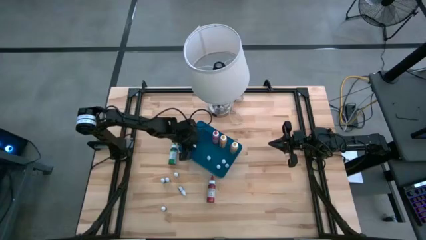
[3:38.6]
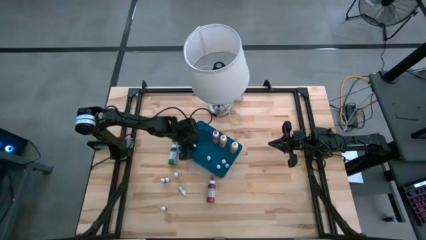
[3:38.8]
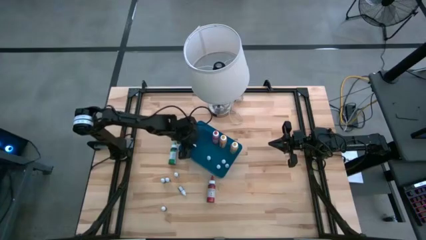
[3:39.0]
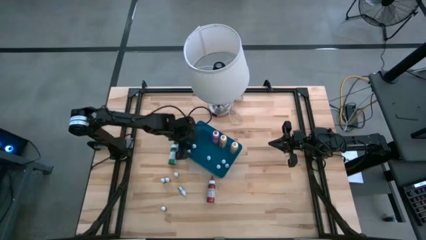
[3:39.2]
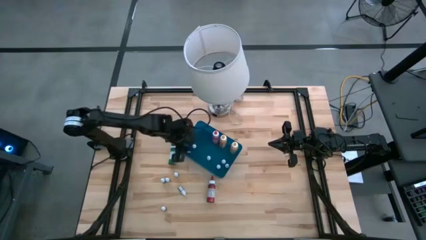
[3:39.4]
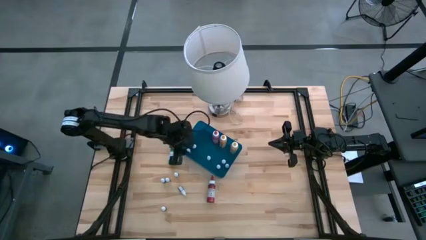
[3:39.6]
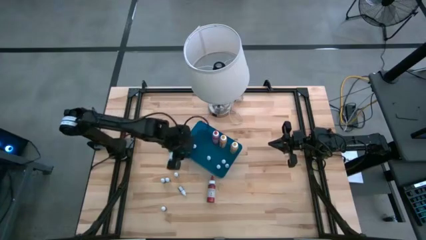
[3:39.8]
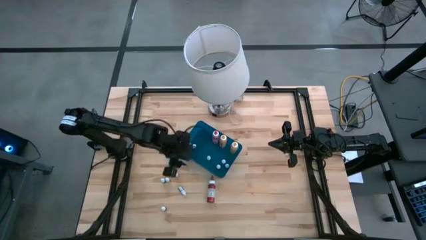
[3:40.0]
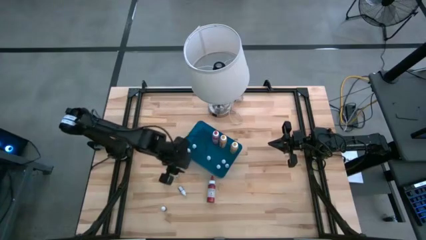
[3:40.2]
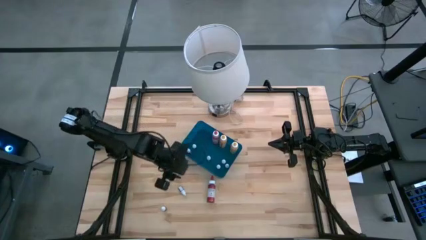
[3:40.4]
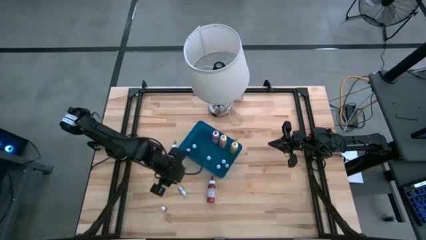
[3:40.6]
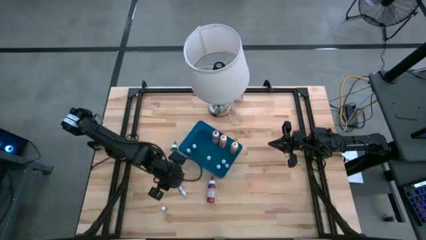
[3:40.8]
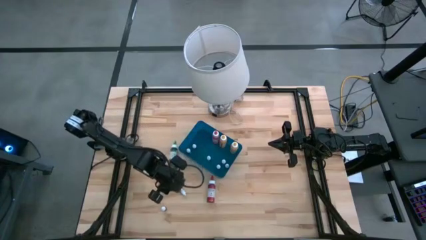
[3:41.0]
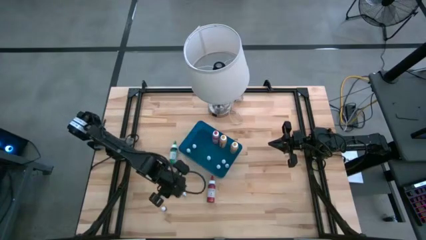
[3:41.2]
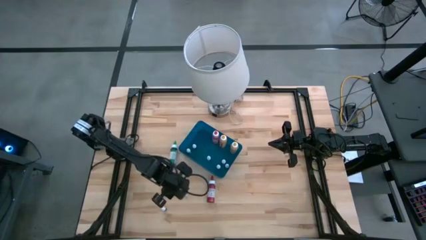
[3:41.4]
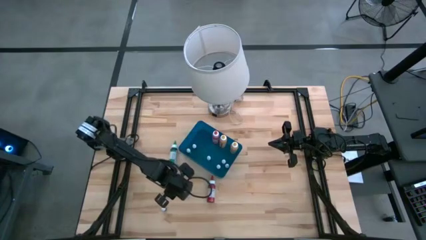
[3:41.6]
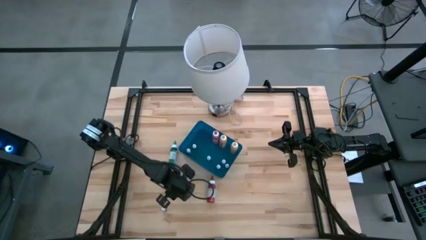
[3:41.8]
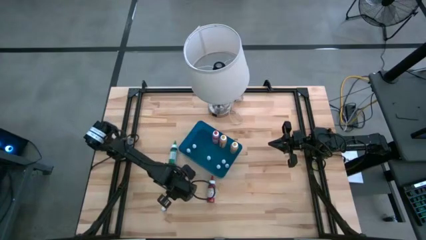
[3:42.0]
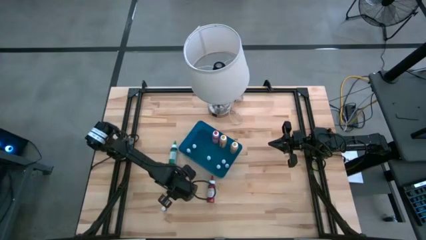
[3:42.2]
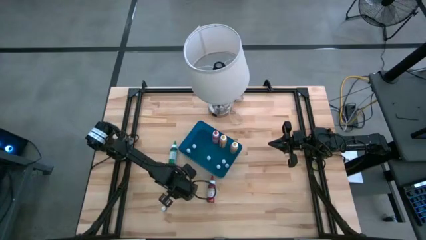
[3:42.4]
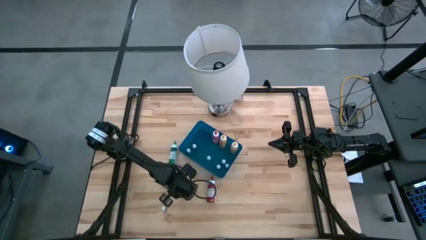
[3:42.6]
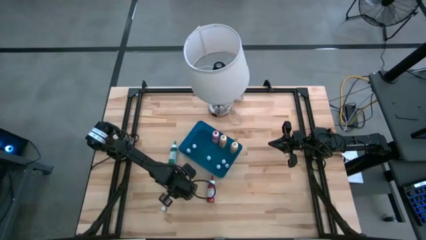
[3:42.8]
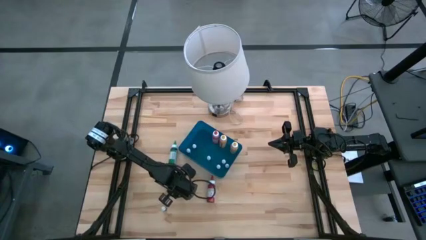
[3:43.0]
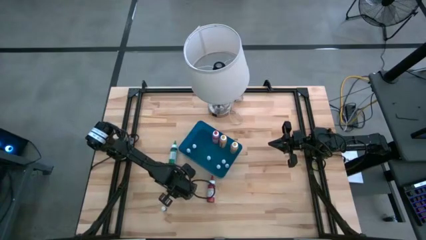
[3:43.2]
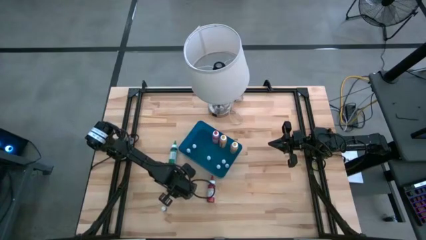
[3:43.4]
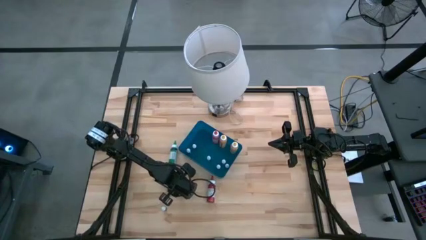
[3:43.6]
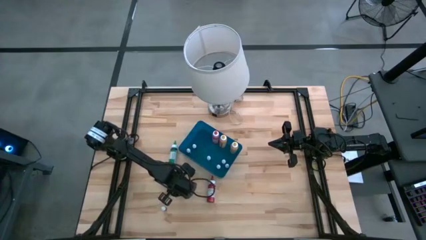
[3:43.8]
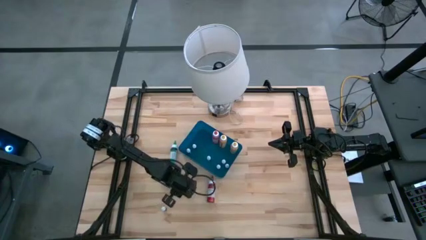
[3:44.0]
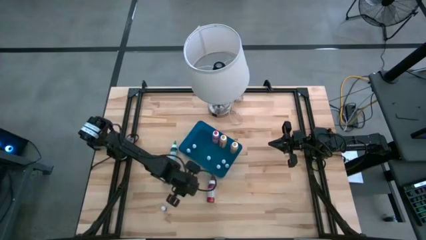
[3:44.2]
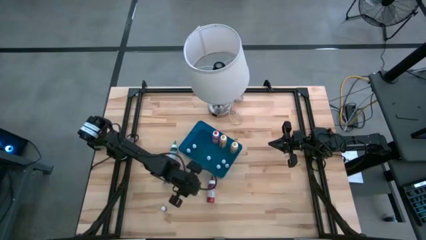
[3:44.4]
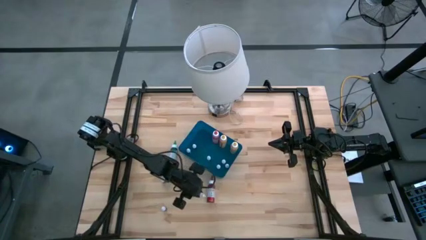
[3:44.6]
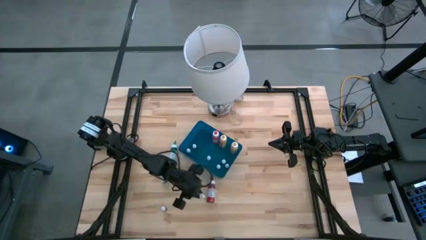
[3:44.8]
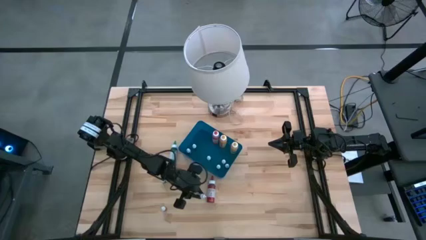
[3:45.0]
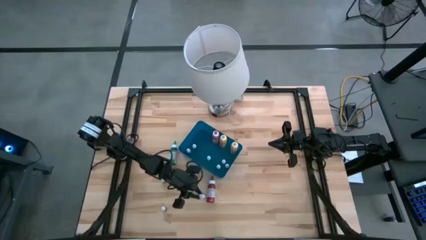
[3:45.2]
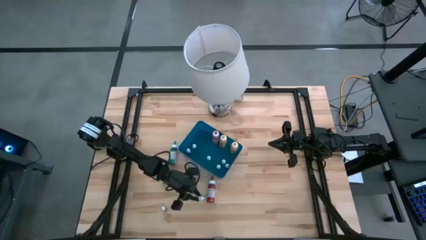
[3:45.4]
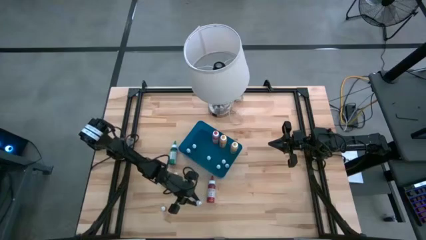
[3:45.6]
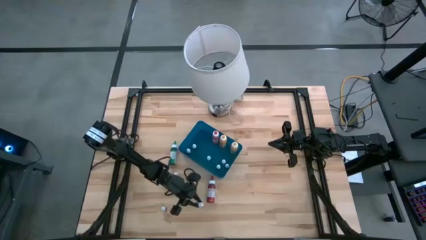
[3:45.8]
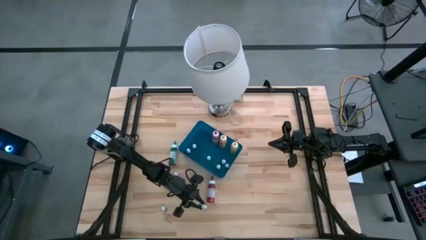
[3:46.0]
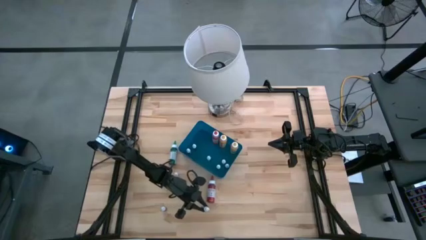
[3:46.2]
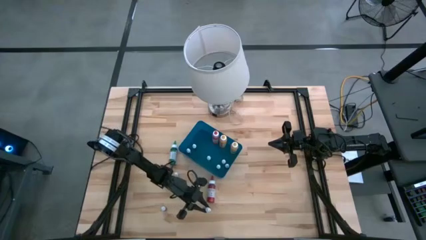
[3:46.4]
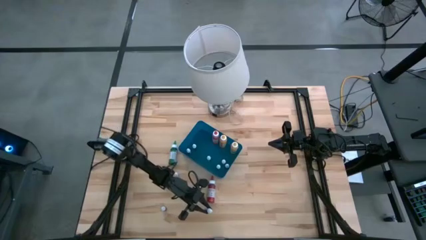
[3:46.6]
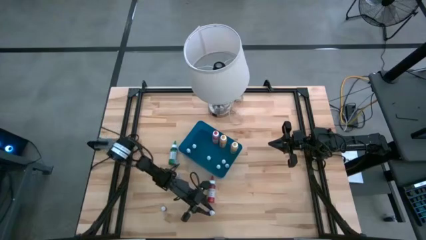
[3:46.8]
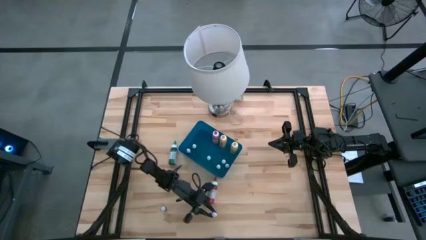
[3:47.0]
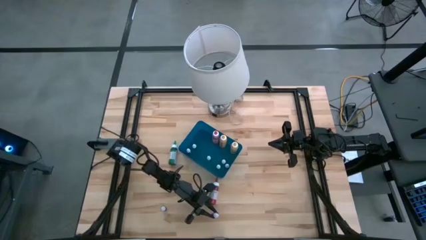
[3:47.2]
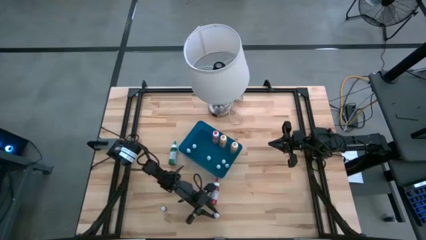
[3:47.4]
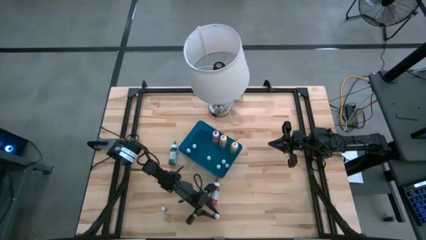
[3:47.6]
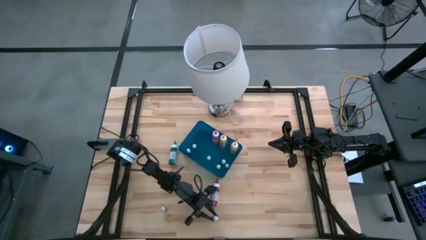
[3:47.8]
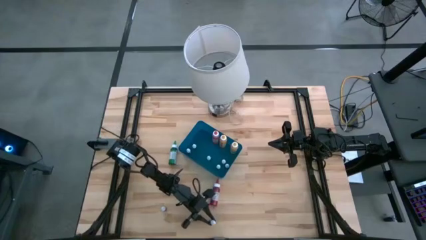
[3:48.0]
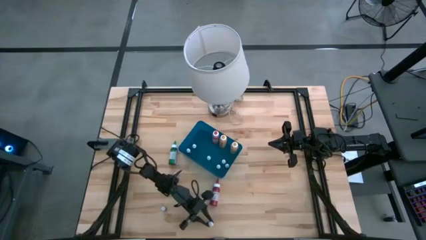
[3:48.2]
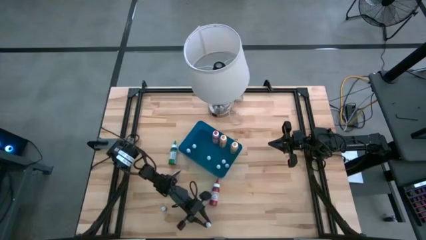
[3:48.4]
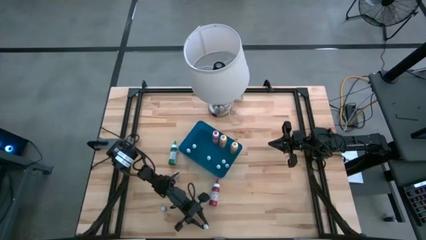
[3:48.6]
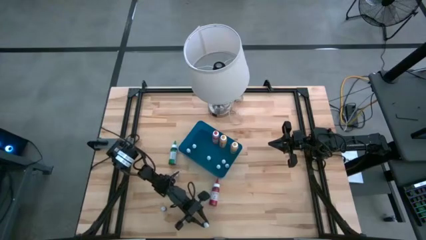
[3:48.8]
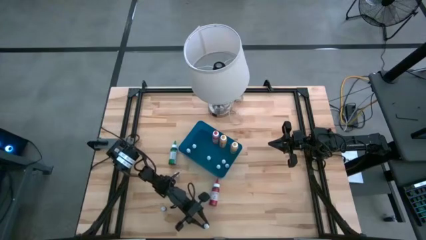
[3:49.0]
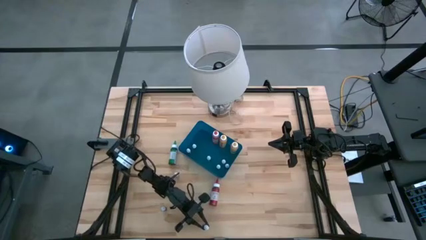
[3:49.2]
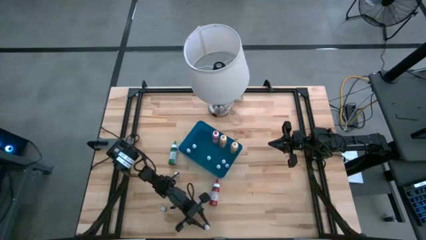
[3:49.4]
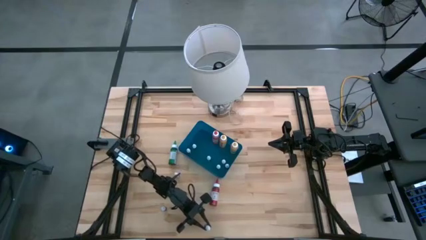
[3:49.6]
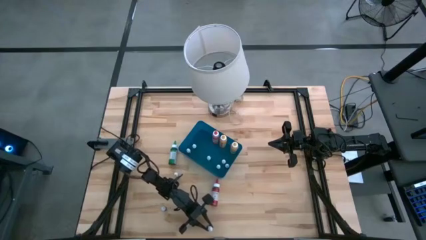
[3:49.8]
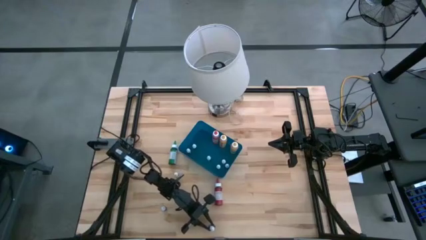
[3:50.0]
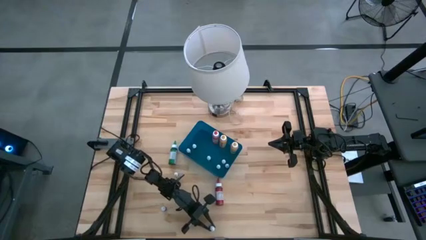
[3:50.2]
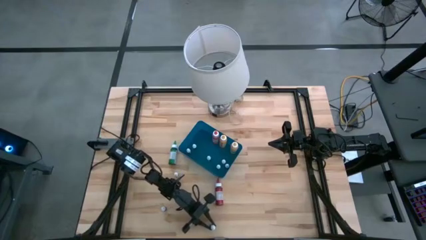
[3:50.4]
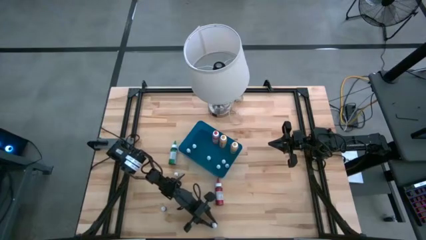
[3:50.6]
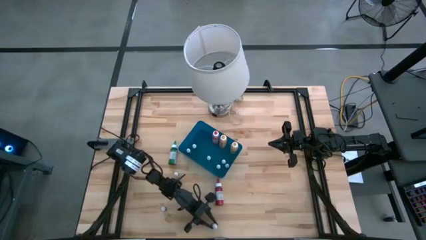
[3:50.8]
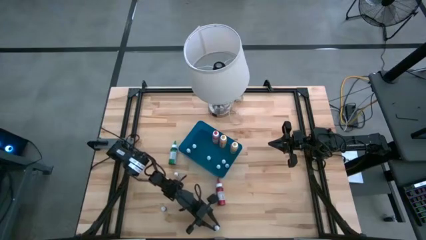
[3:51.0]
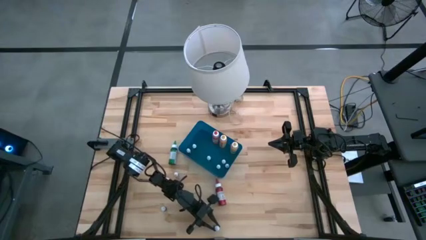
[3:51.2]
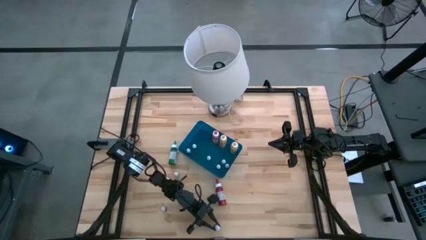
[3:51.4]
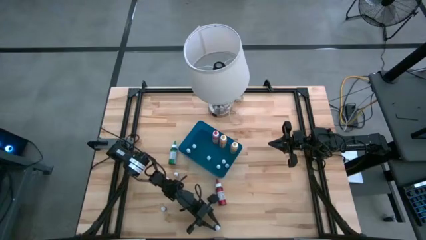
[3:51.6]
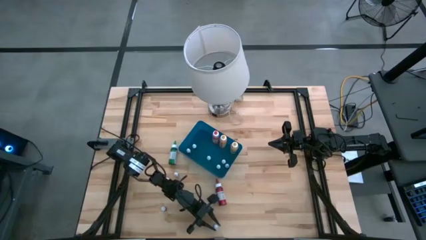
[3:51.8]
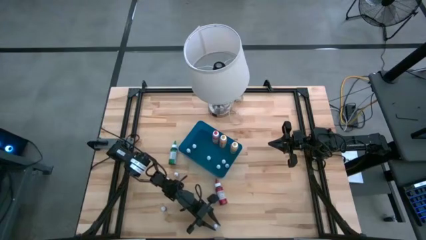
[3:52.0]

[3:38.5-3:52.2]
Task: Pick & Place food coloring
Put the small blue food coloring bottle into the blue container
